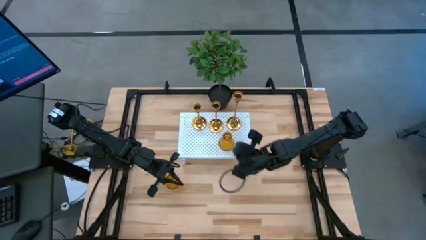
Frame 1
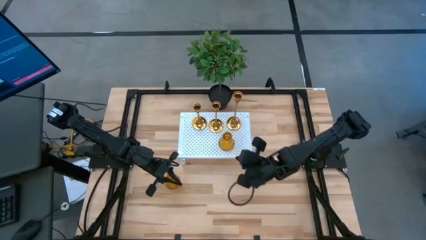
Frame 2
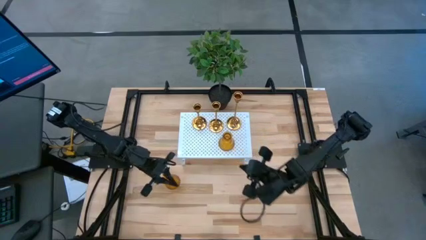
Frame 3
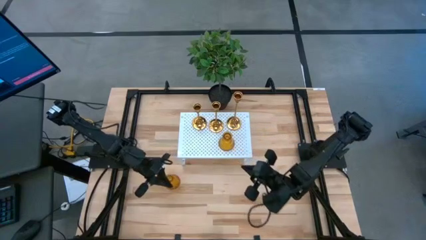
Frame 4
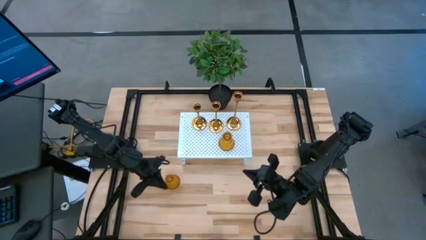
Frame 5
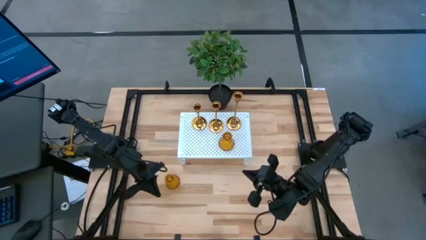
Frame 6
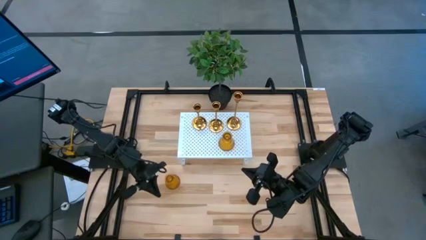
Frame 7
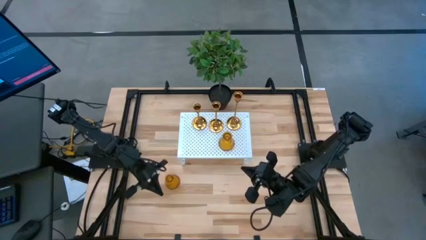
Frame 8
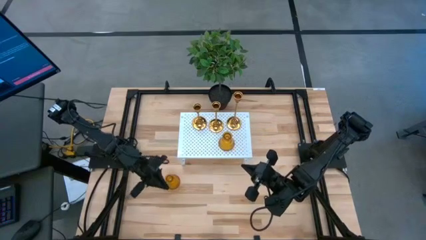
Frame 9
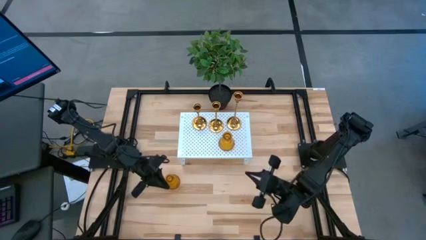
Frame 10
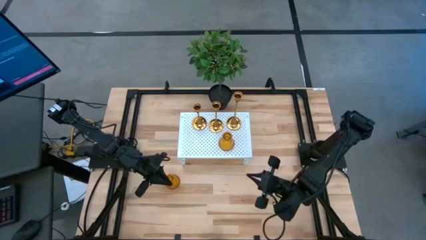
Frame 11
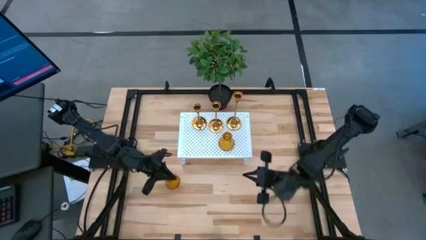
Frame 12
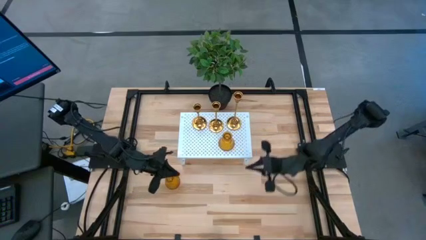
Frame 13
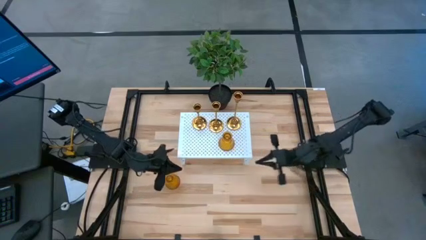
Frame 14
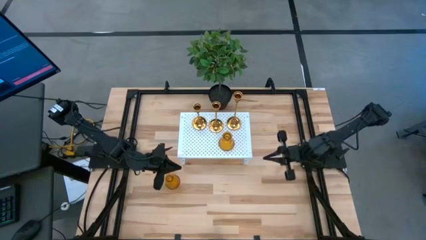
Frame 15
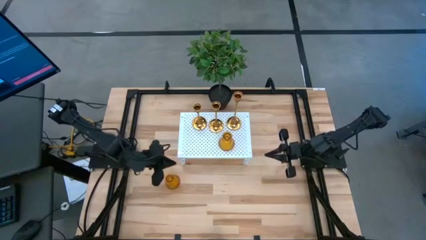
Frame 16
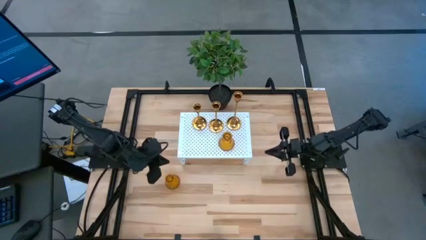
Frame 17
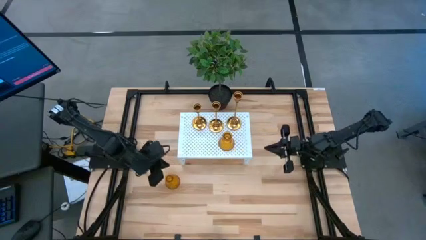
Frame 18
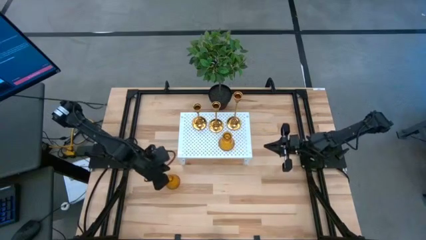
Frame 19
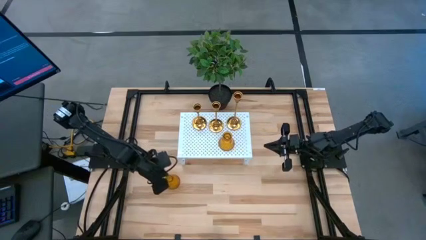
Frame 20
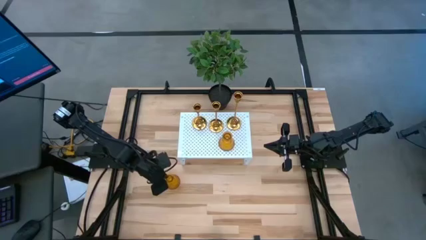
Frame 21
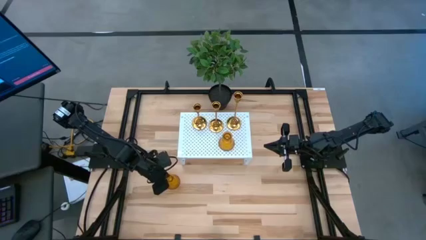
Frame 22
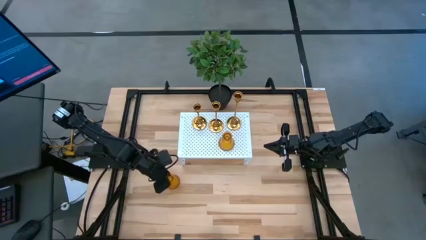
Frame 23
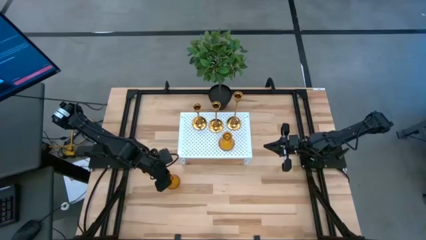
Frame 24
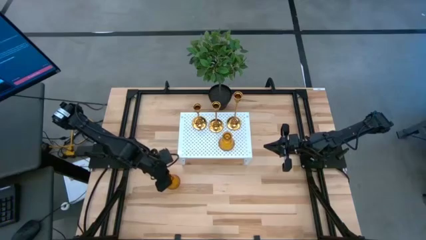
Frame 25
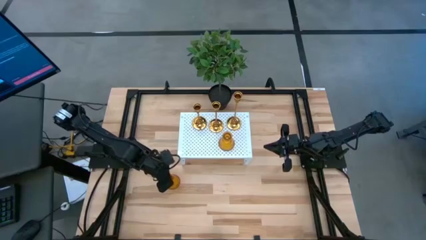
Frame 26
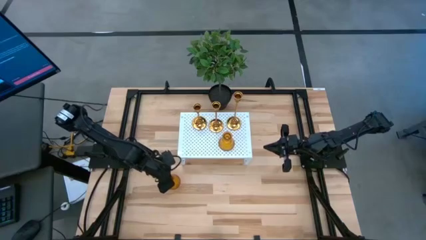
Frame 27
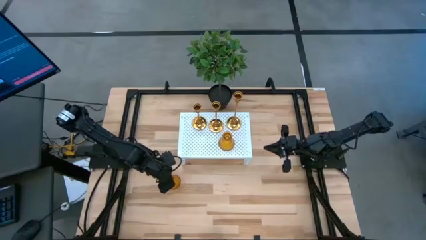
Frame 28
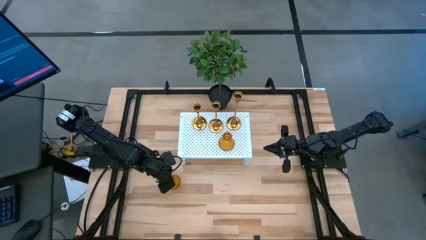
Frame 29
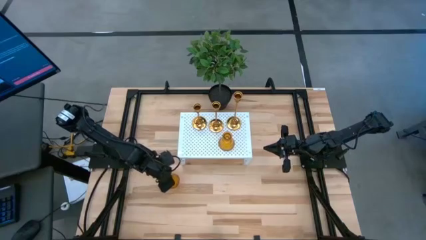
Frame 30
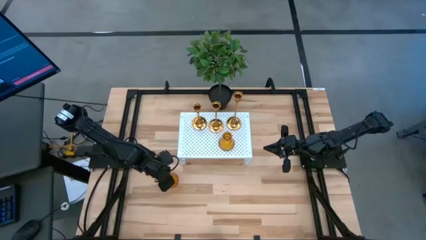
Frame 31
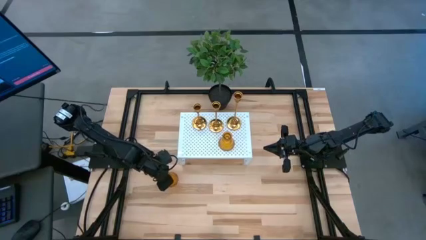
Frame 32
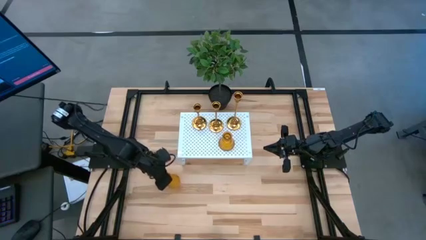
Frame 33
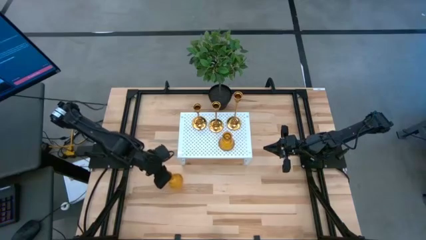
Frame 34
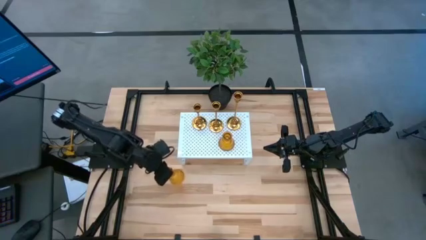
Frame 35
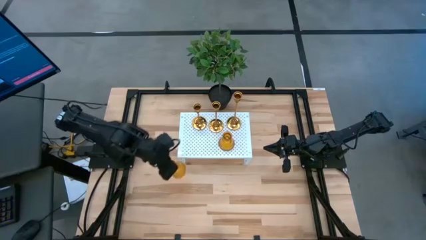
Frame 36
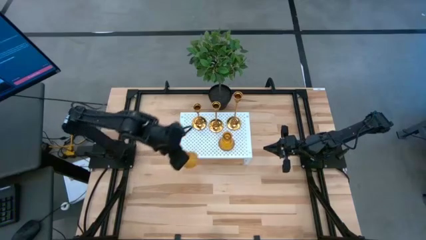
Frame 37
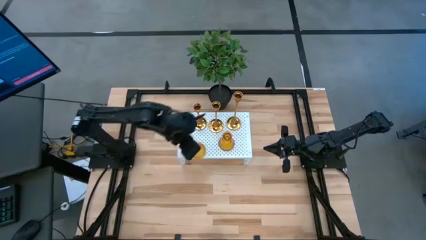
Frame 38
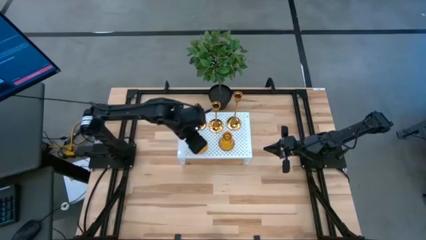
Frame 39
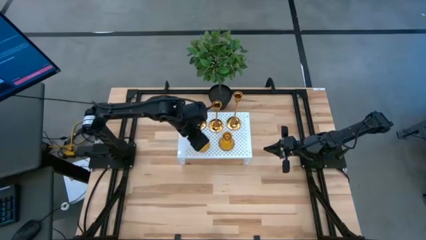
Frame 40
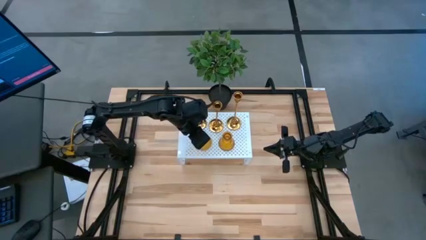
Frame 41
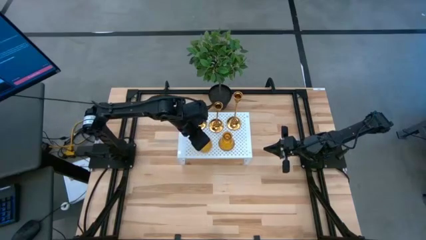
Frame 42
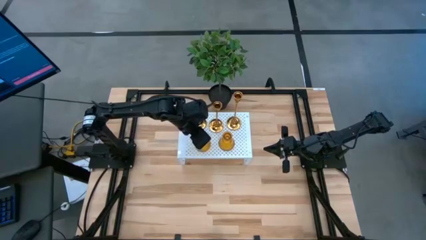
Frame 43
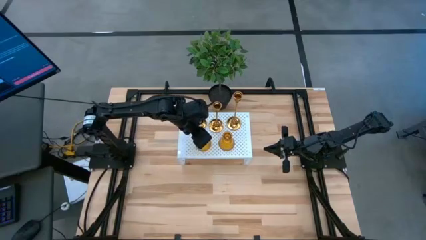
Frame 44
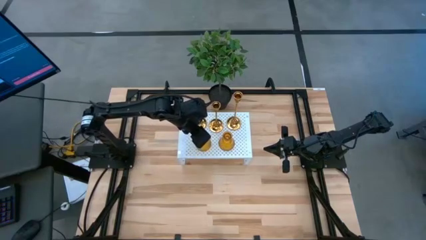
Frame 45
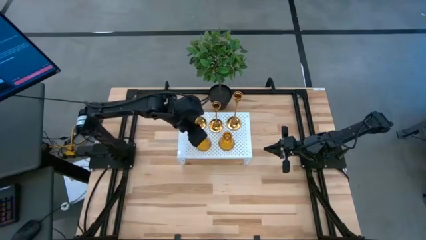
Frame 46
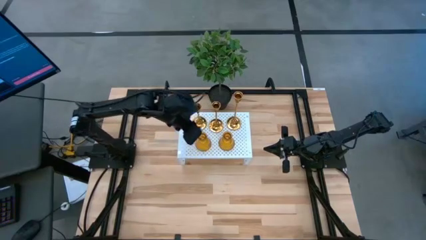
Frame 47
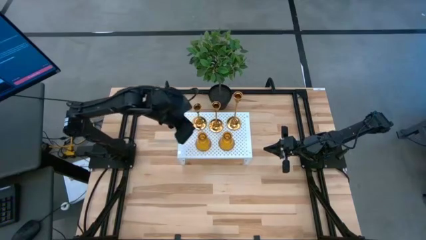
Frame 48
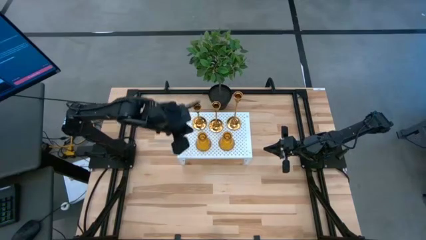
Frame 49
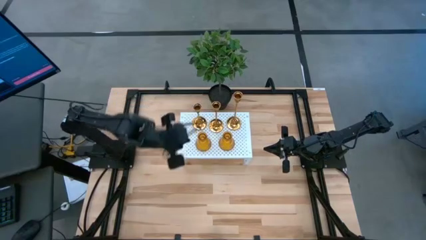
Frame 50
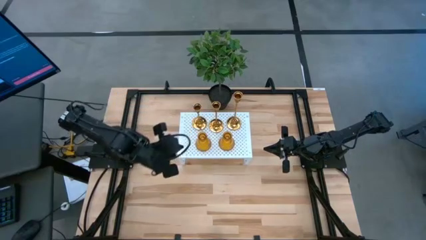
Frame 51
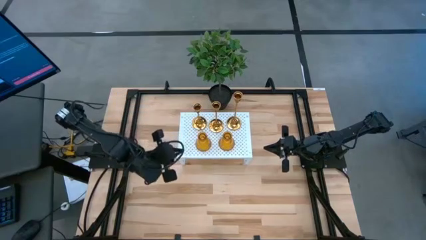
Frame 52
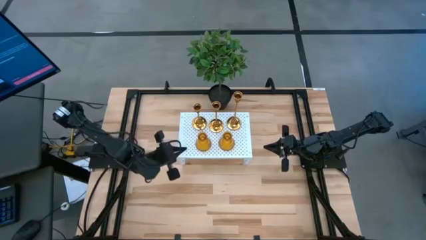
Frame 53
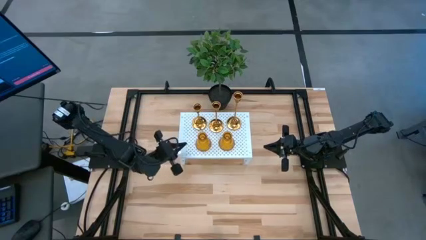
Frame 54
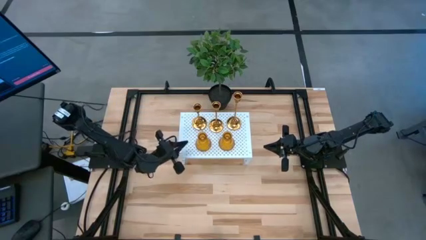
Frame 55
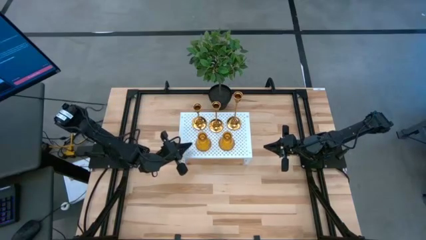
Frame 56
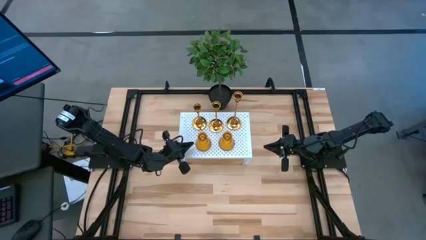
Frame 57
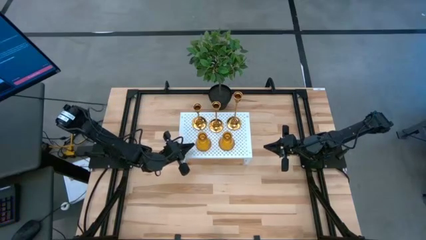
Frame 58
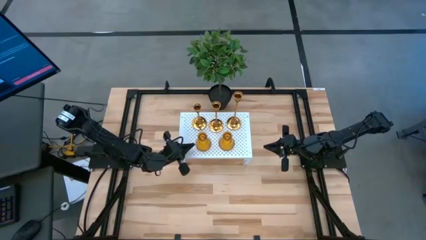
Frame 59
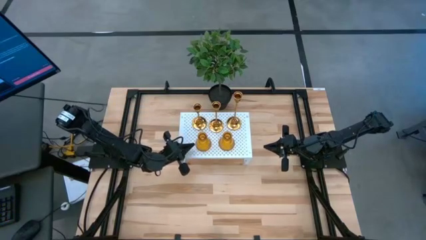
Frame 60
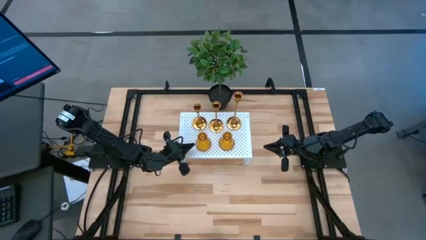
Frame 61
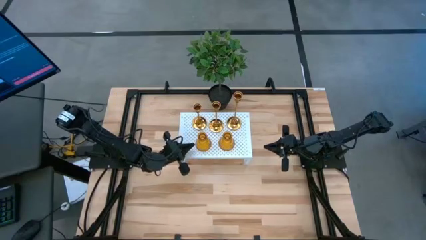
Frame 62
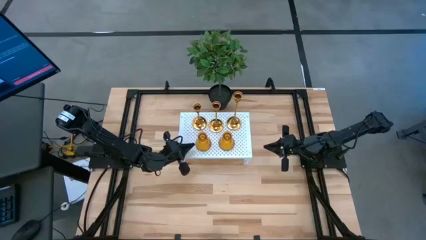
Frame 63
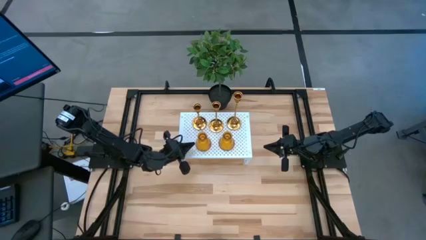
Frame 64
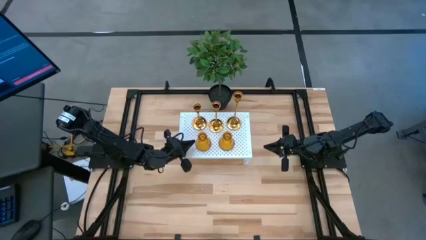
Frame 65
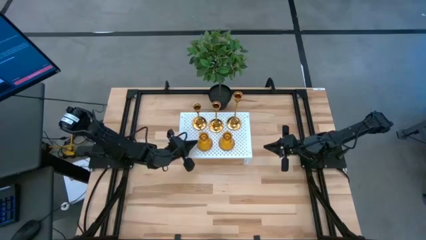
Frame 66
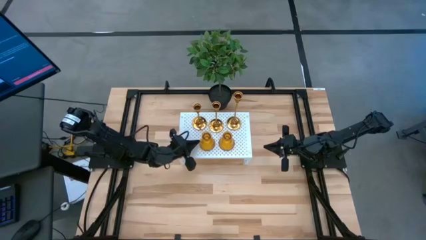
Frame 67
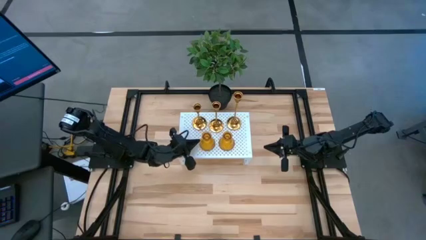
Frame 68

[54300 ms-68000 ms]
Task: Pick & Place candle stick holders
Put the orange glass candle holder on the shelf

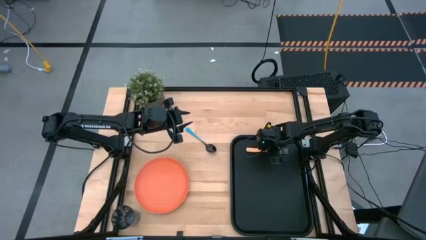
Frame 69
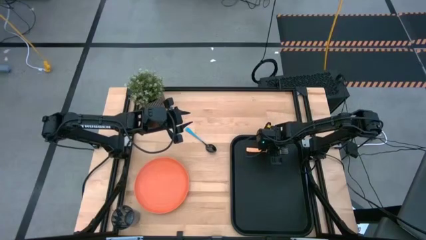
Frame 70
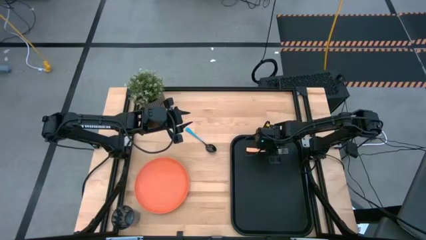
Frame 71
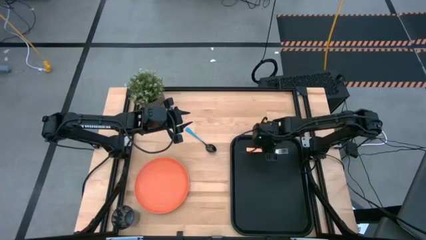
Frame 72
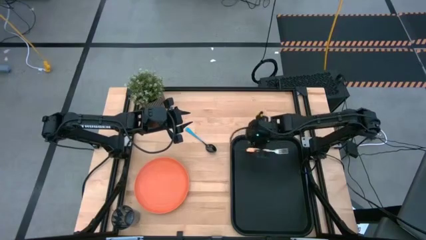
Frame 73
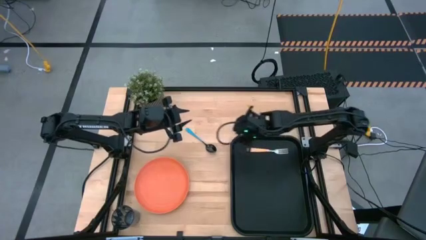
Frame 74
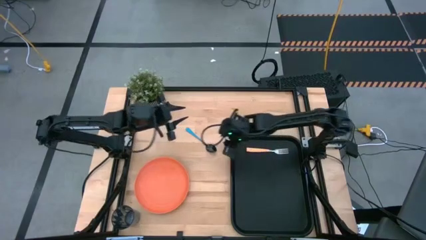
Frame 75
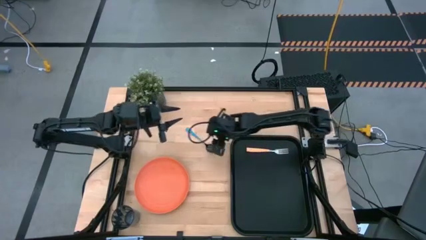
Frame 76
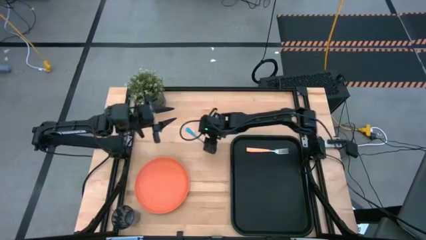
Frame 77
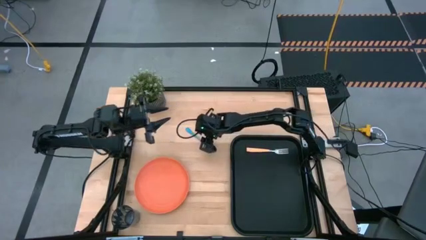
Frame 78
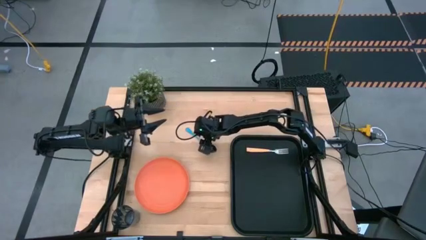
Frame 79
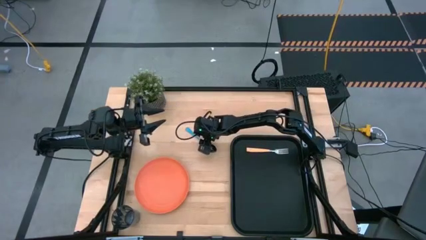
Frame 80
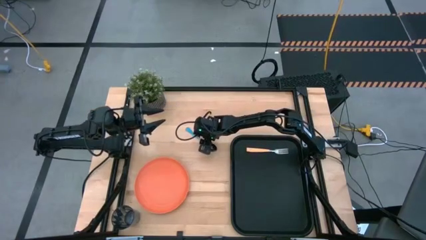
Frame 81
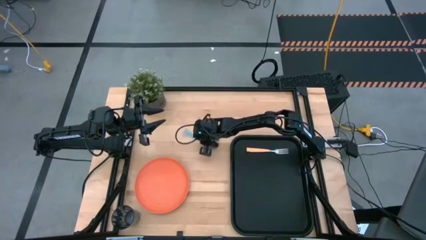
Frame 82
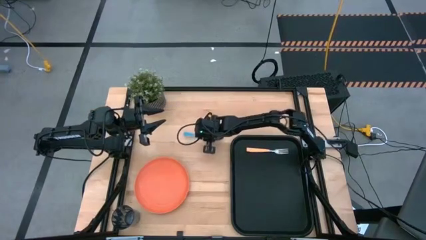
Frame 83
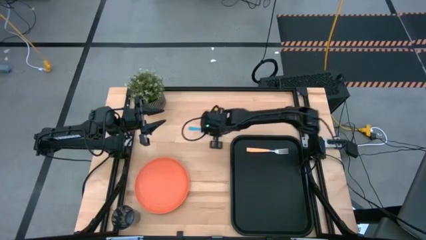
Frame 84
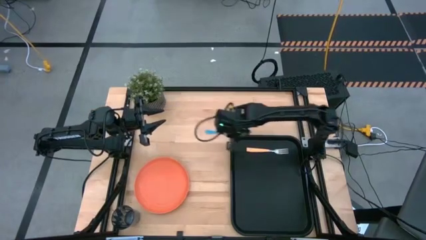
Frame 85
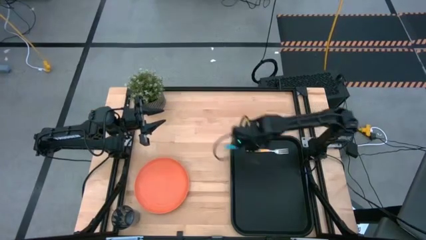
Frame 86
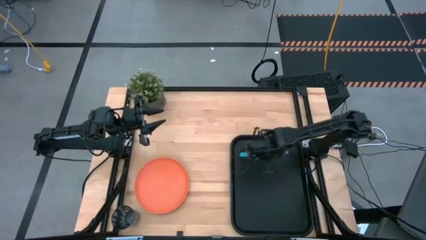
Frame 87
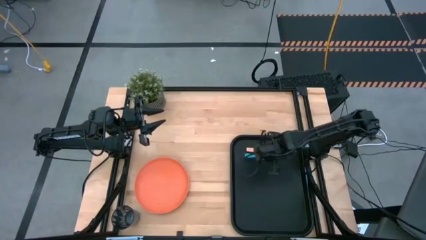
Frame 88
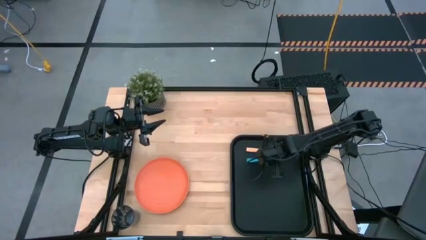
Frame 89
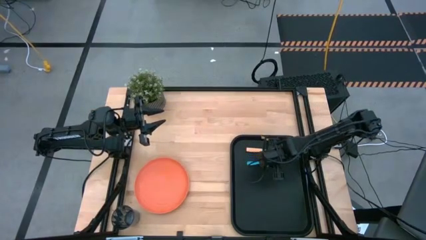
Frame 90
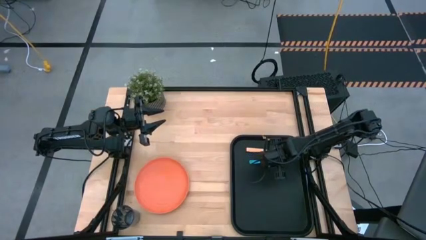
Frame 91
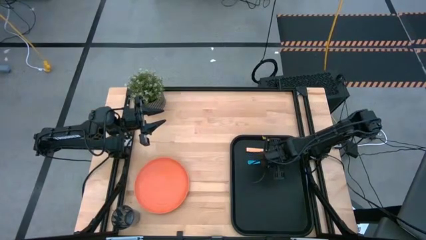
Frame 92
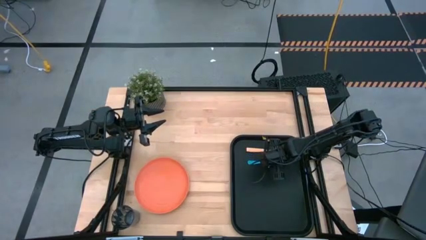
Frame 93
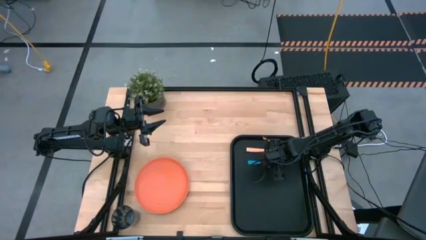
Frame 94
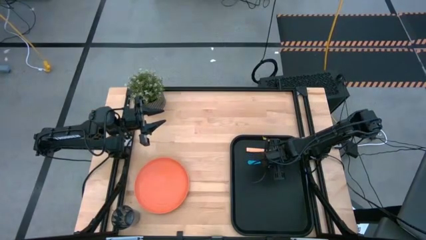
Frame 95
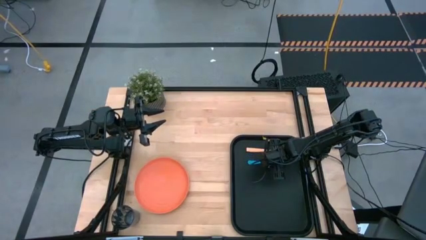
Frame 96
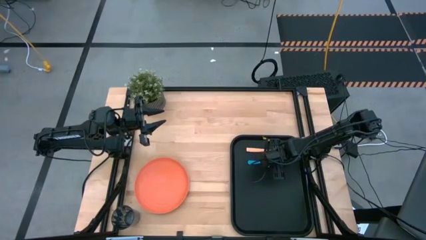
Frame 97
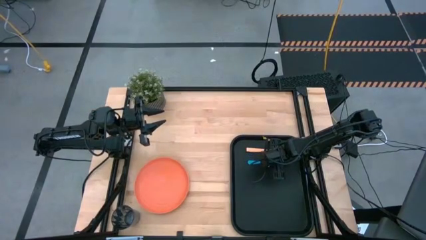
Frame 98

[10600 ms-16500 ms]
Task: Pick and place plate/cup/fork/spoon on tray
Put the blue spoon to the bottom of orange fork on the black table tray
